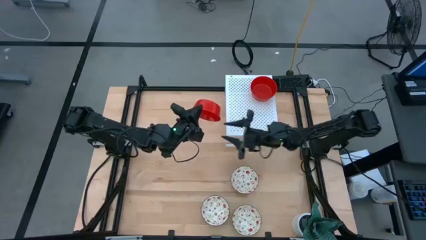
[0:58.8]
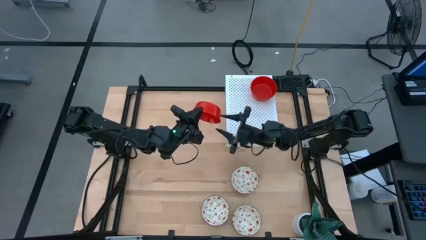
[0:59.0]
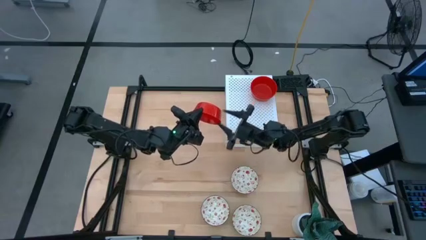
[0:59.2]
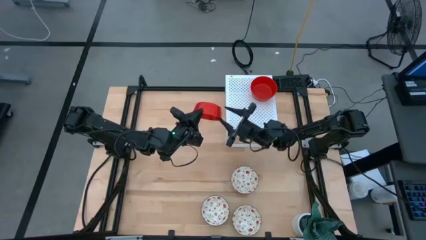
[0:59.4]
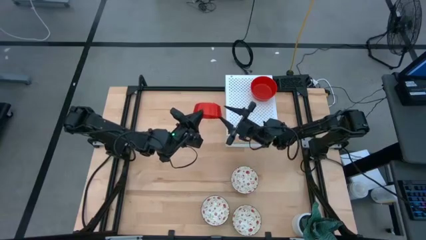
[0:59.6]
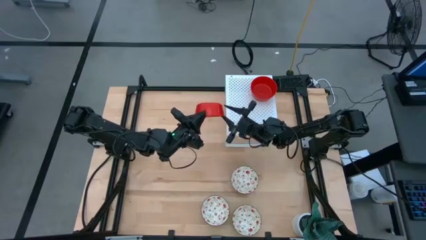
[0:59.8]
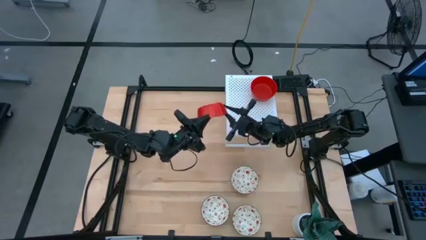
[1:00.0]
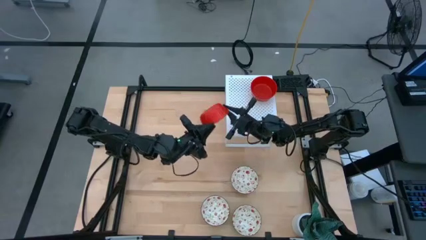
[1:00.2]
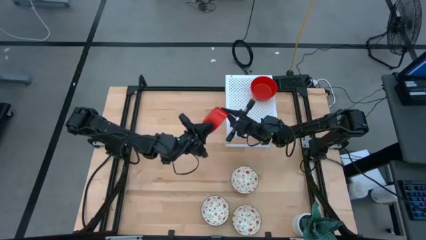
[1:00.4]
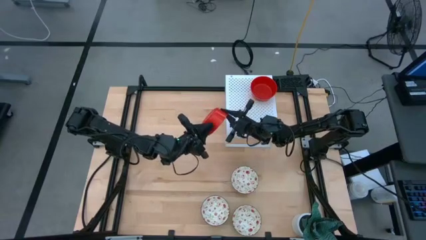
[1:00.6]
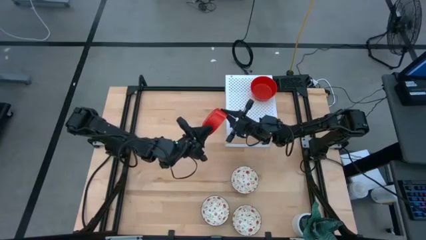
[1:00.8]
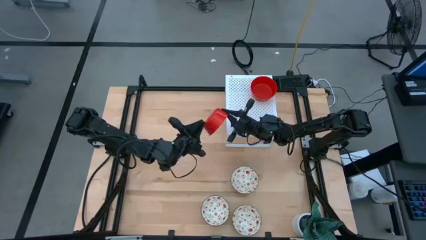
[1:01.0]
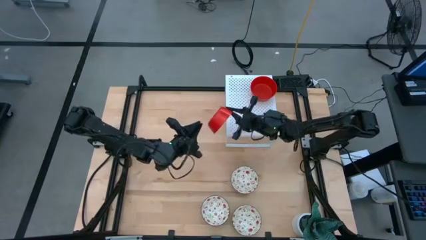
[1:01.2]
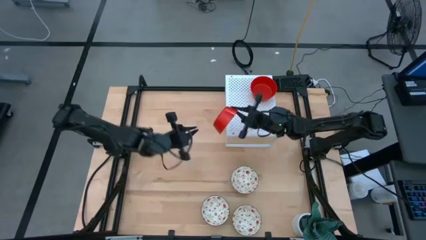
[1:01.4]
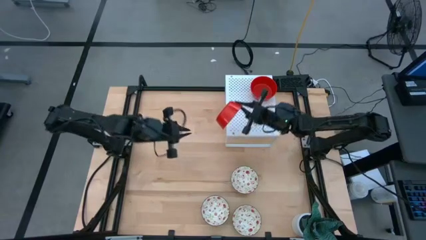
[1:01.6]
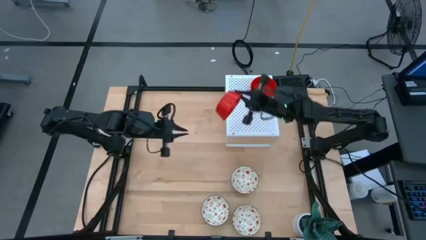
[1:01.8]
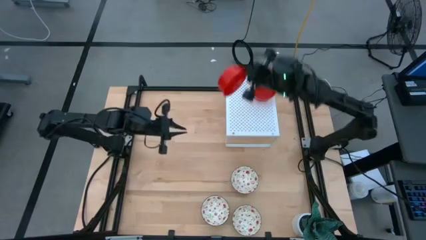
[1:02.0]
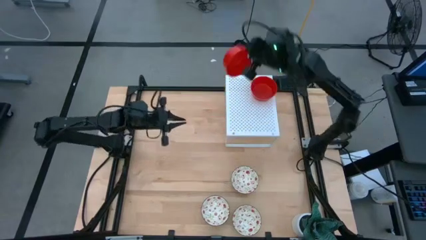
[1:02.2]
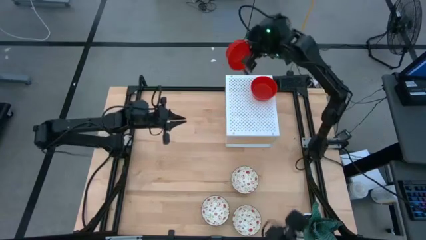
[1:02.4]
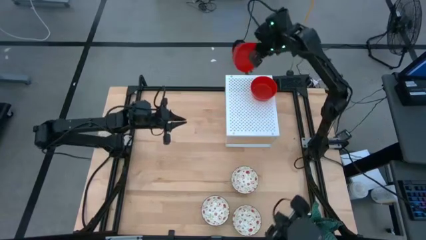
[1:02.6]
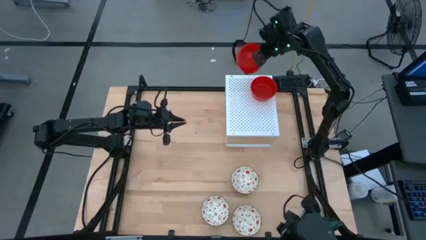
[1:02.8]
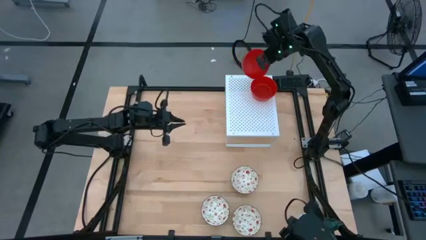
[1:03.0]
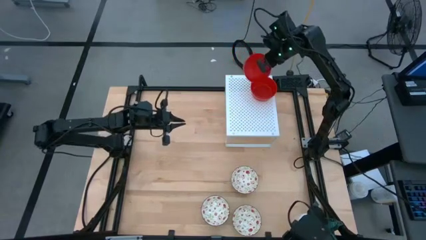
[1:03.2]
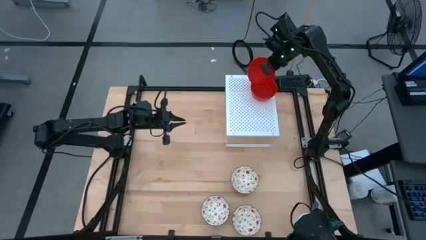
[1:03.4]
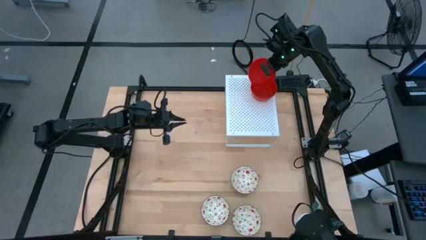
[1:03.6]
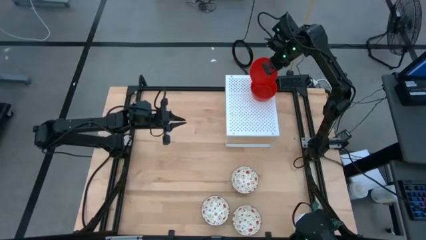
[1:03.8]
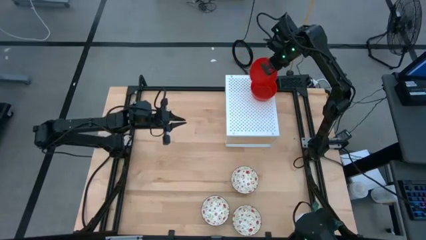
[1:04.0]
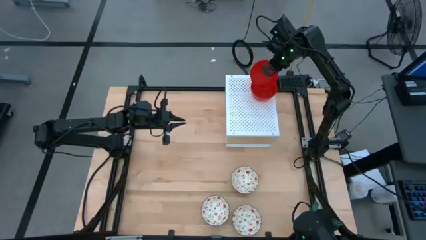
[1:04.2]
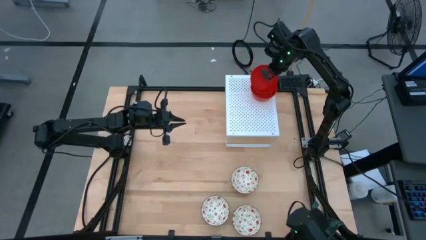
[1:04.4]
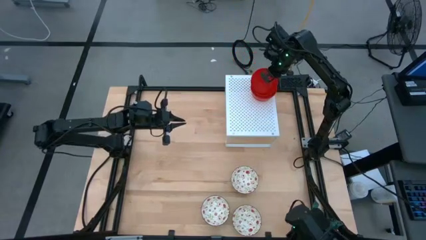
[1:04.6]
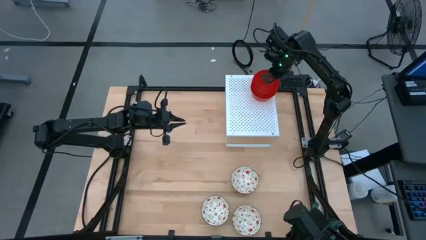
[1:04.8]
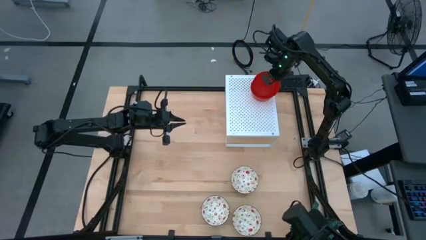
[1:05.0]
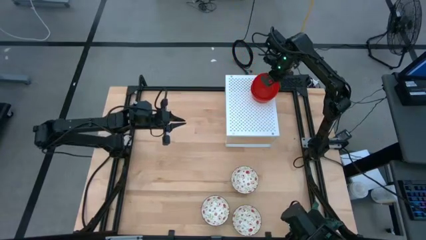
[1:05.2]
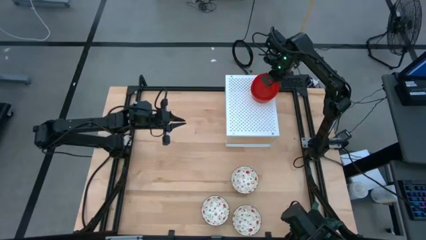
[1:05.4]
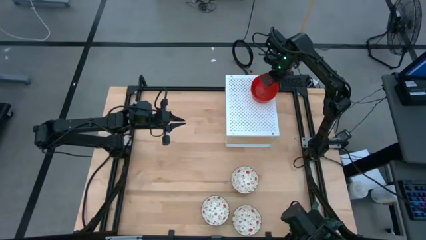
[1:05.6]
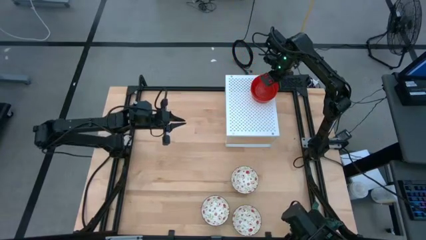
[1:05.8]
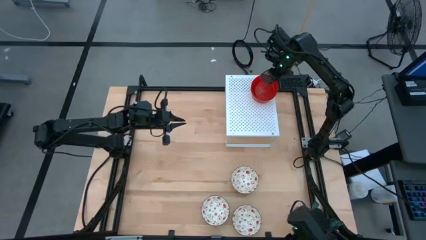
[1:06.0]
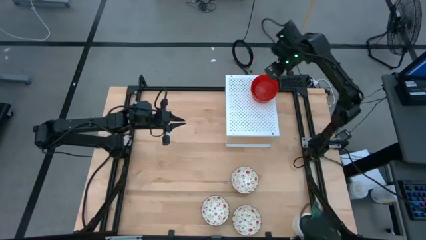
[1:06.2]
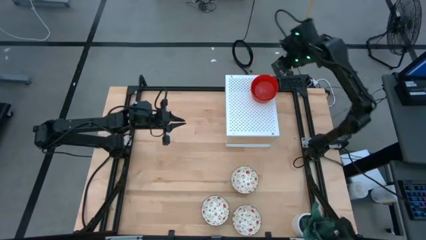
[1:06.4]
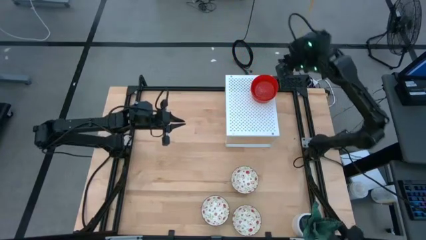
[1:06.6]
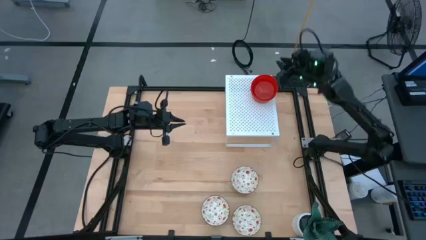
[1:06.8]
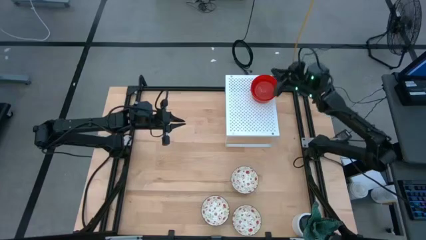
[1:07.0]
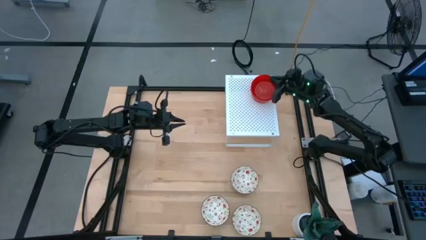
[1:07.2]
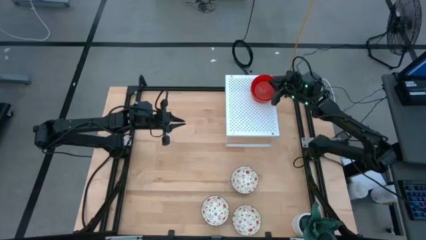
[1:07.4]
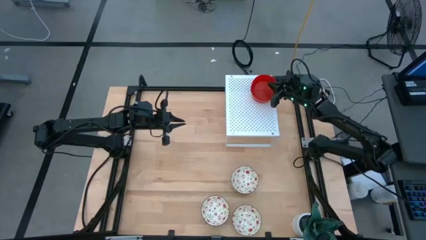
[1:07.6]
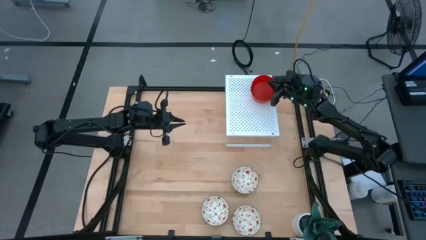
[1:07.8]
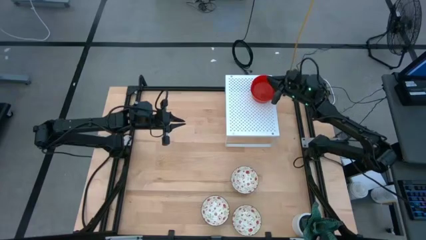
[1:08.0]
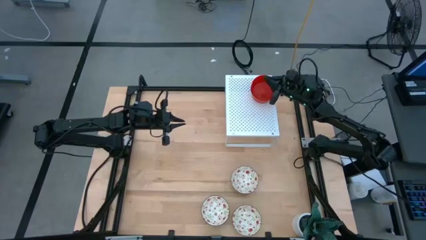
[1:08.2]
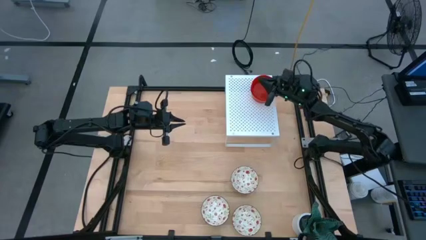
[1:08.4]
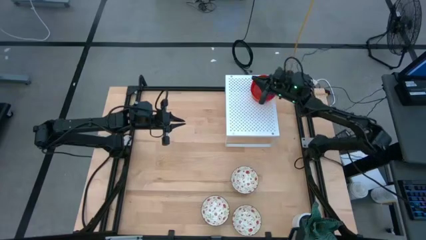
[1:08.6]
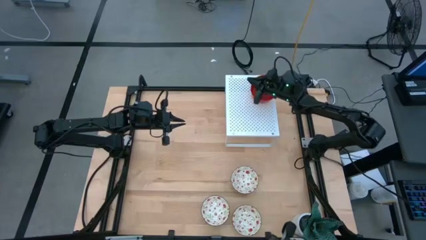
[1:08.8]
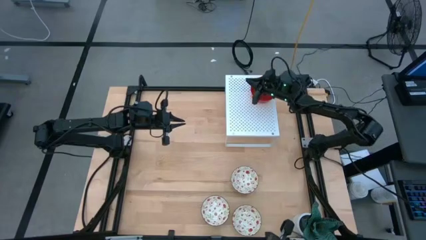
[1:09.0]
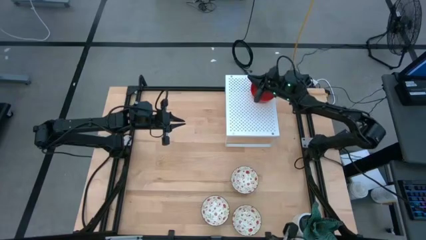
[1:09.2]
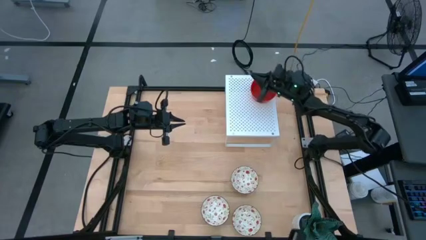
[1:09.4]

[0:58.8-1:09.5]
Task: Pick & Place Mini bowls
Stack the red bowl on the red bowl on the shelf
